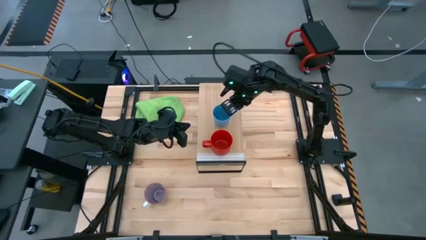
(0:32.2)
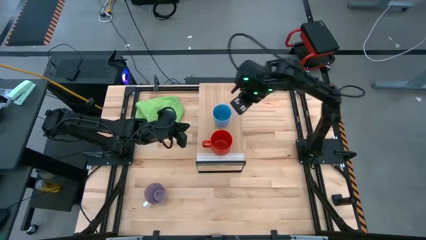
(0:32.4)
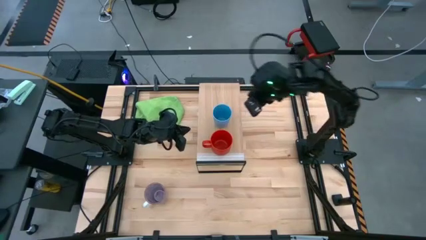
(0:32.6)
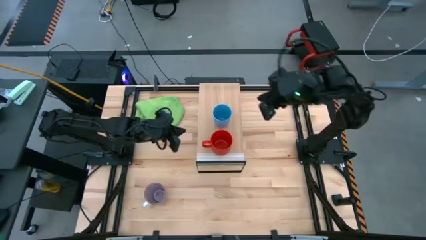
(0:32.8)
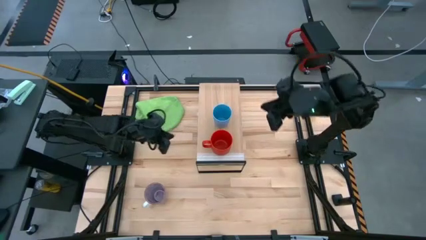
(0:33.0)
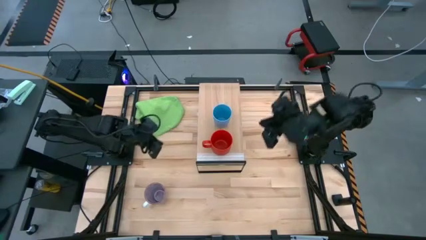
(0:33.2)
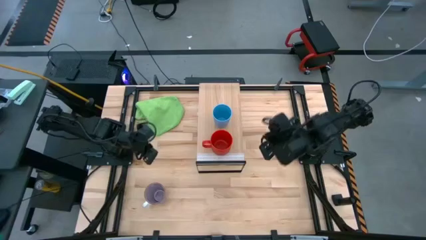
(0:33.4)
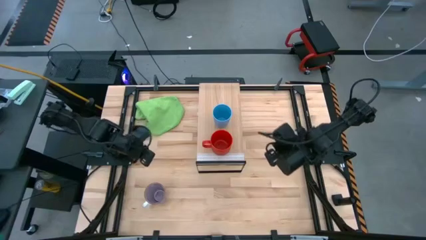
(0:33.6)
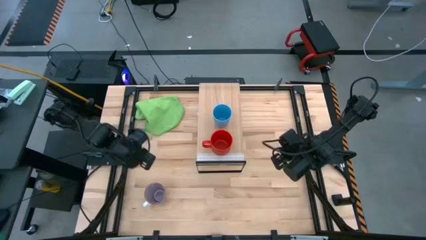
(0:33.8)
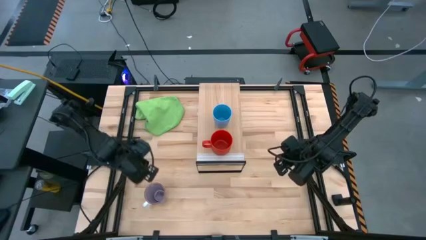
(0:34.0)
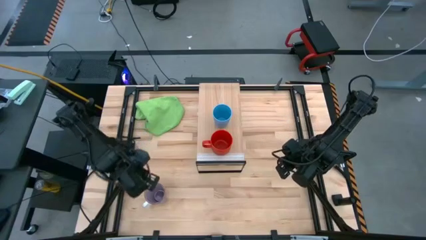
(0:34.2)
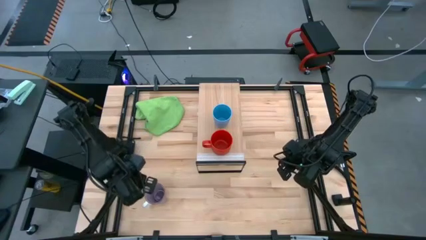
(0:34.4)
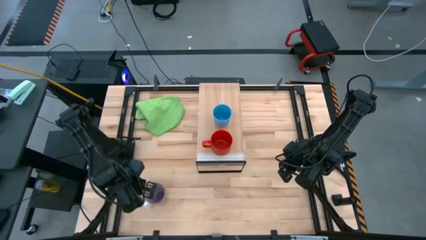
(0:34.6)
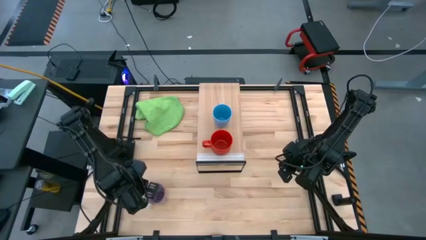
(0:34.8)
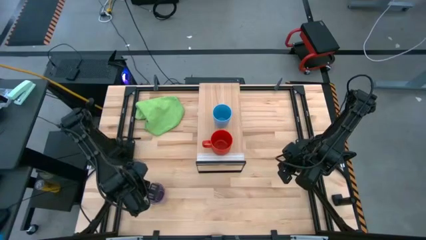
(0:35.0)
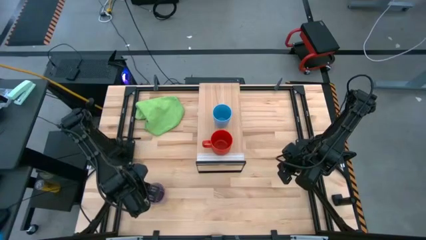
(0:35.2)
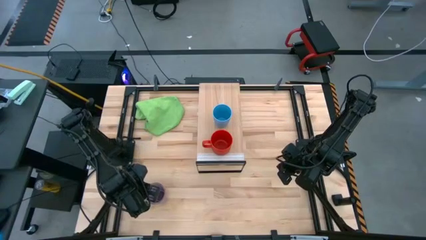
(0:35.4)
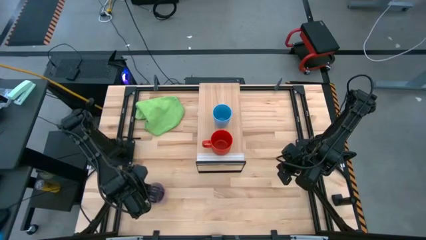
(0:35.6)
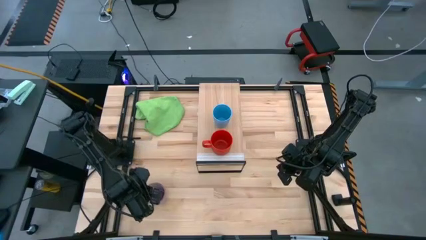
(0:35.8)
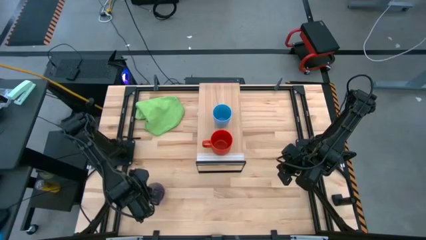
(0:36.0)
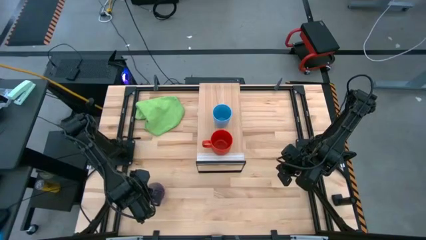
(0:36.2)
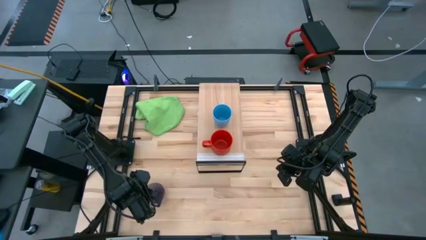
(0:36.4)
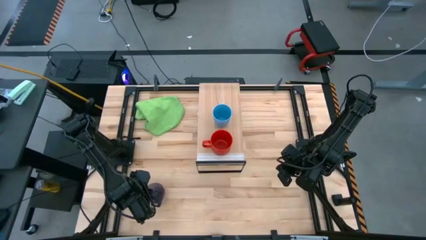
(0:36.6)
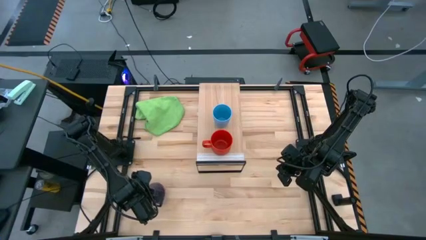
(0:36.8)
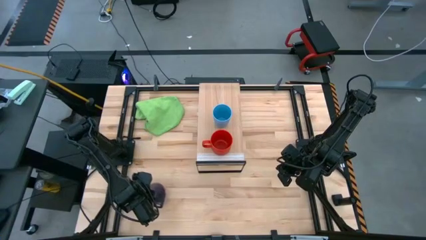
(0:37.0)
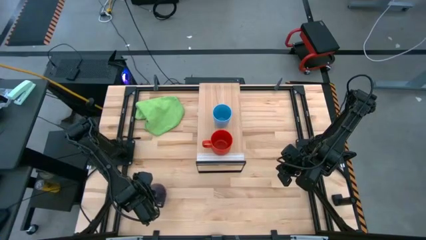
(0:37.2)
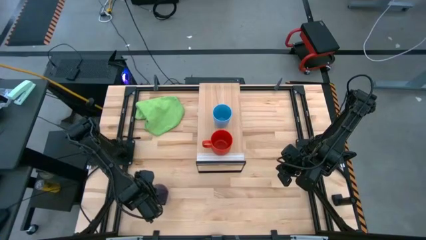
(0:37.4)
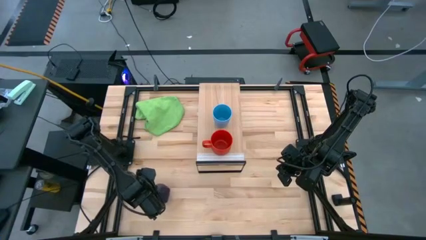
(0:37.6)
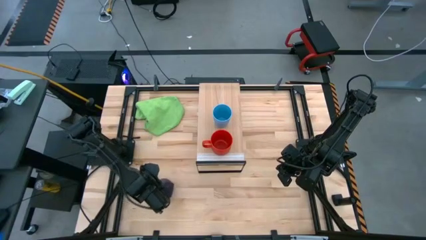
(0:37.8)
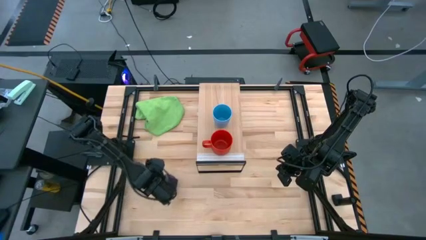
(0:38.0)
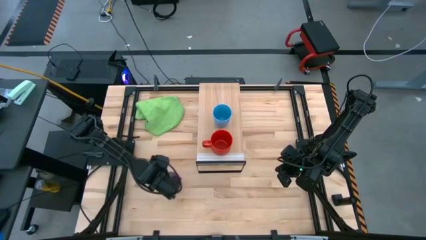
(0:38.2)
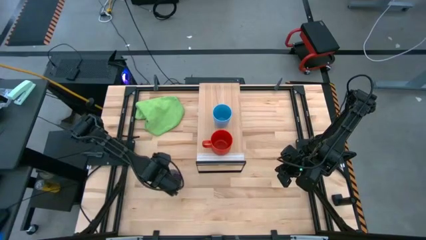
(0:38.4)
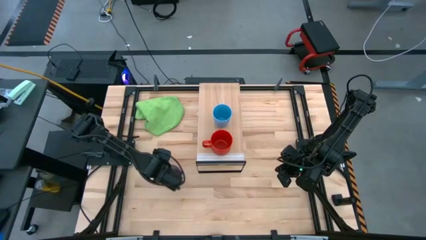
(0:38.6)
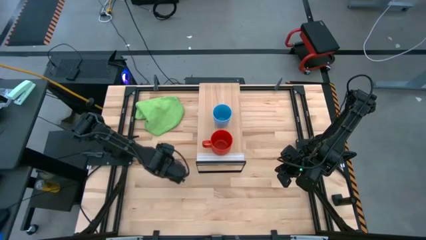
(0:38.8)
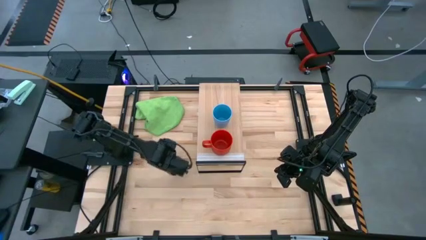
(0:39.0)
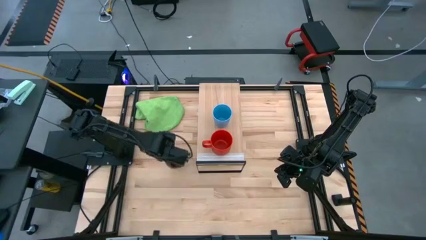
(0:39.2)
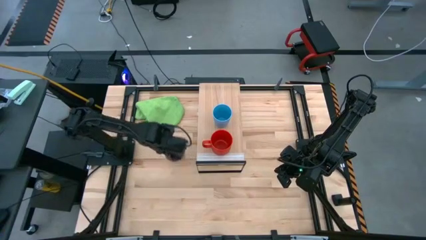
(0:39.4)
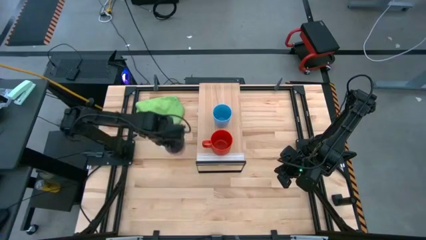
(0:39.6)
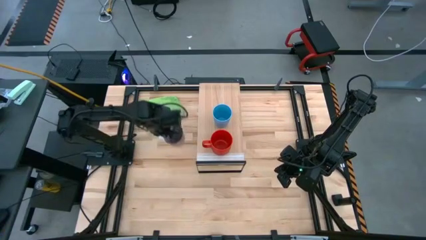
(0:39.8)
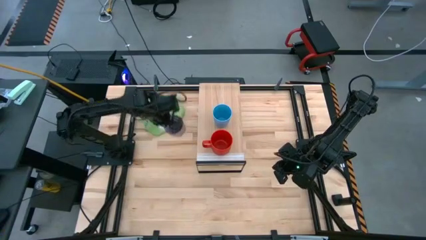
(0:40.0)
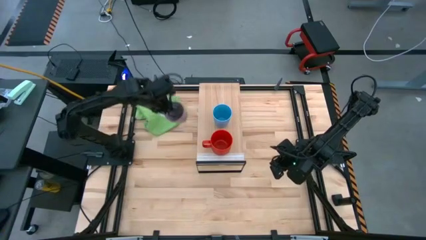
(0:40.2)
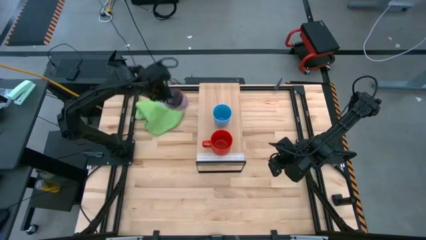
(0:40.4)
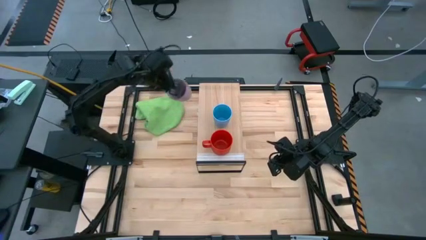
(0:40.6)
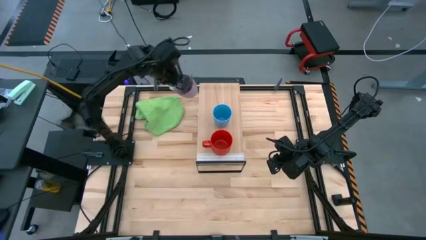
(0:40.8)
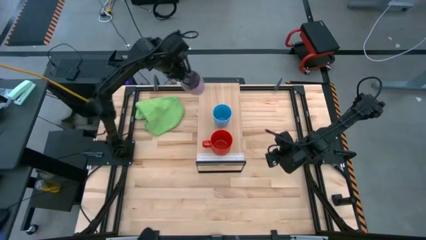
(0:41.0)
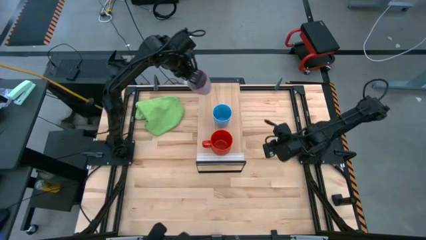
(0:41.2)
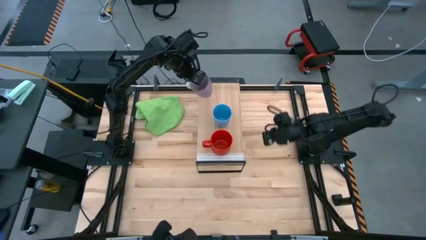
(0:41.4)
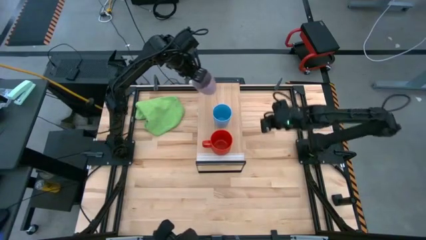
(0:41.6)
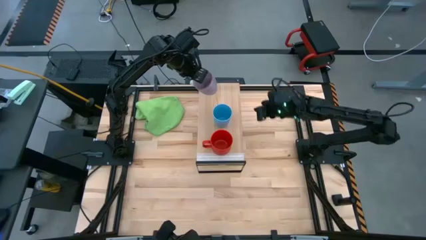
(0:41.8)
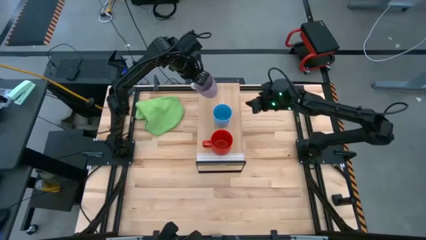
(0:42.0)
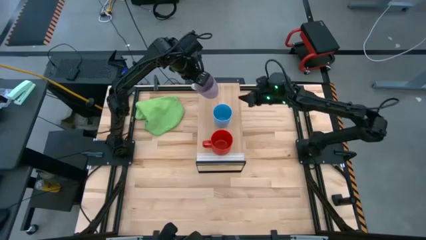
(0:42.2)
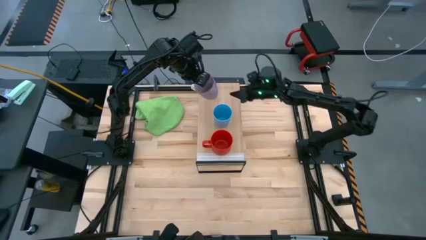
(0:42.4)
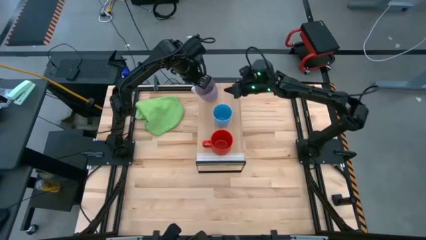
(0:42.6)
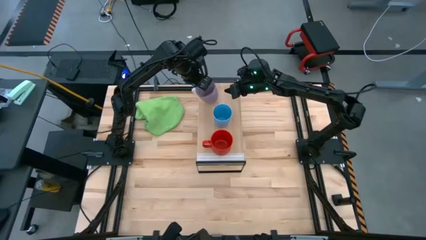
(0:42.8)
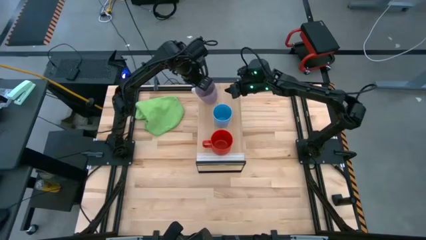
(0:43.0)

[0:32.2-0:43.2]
Task: Stack small to large cups/mugs on shelf
Put the purple mug on the shelf

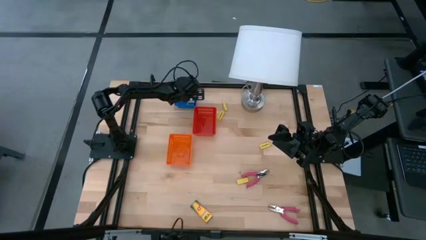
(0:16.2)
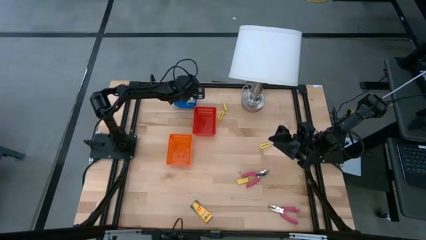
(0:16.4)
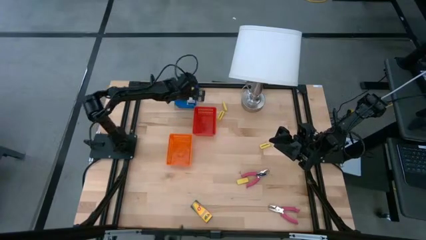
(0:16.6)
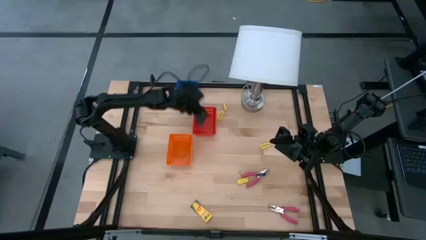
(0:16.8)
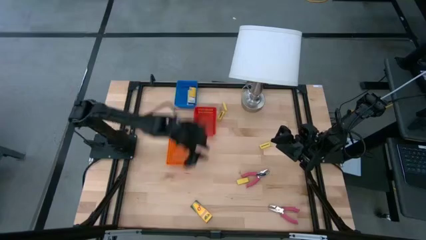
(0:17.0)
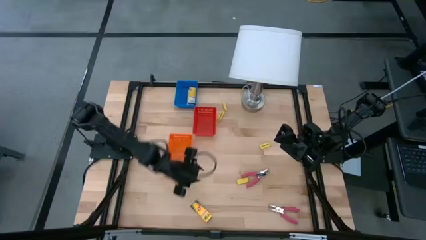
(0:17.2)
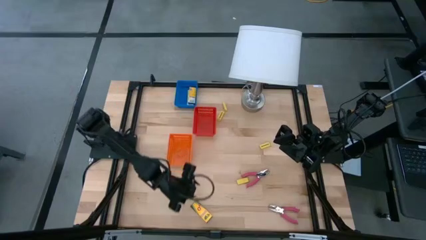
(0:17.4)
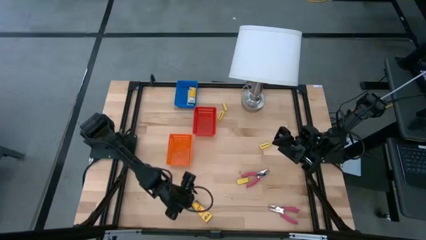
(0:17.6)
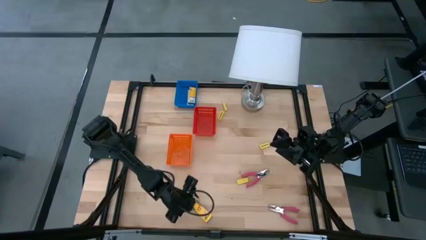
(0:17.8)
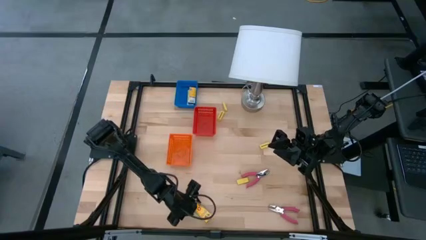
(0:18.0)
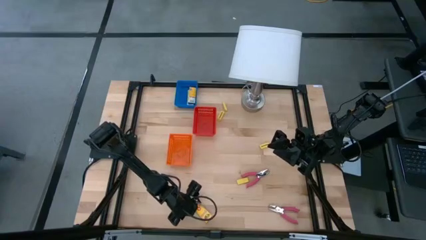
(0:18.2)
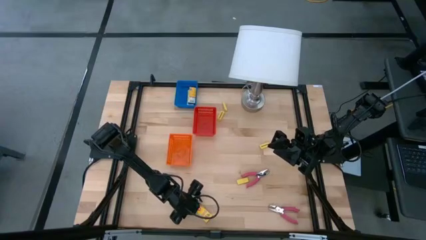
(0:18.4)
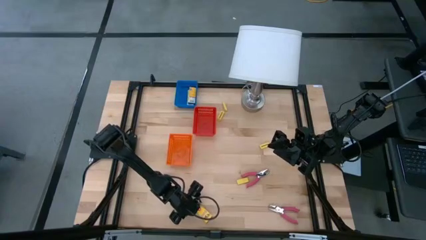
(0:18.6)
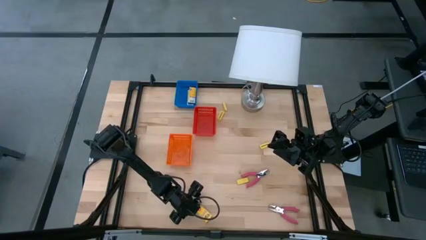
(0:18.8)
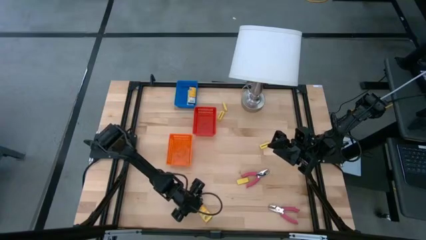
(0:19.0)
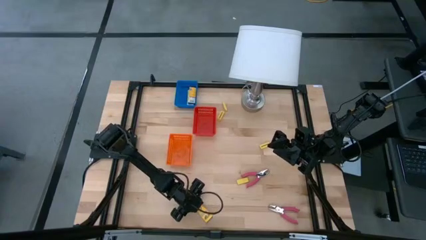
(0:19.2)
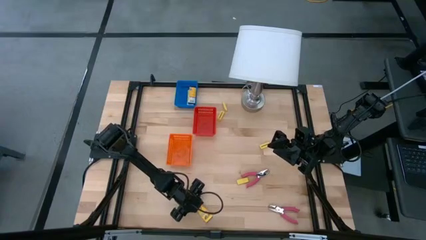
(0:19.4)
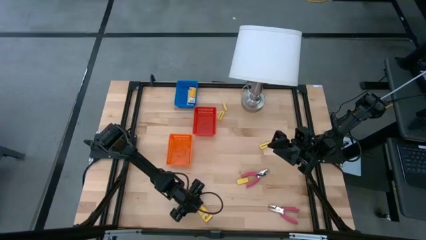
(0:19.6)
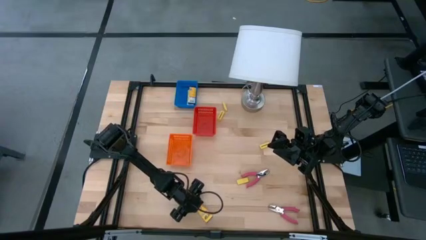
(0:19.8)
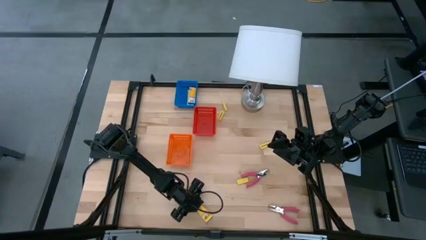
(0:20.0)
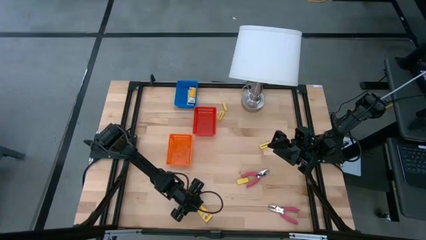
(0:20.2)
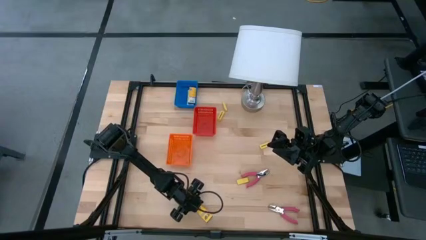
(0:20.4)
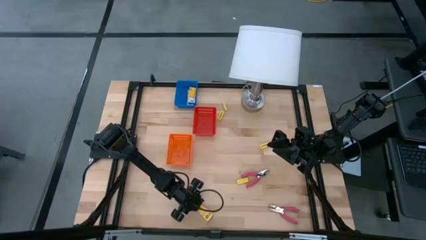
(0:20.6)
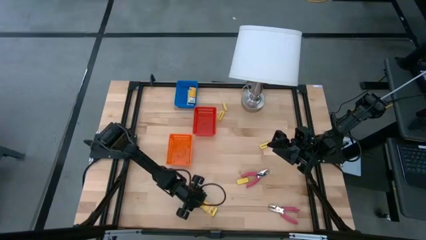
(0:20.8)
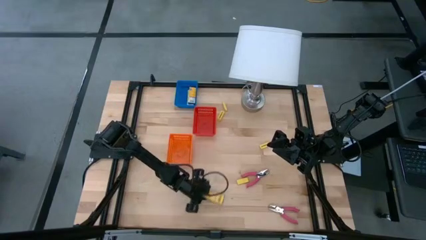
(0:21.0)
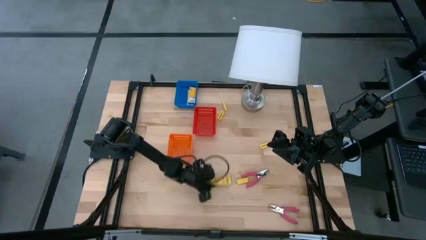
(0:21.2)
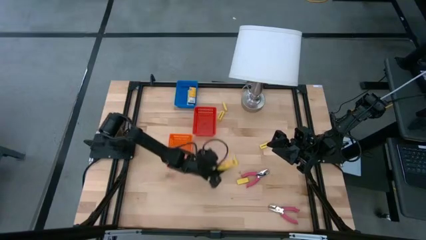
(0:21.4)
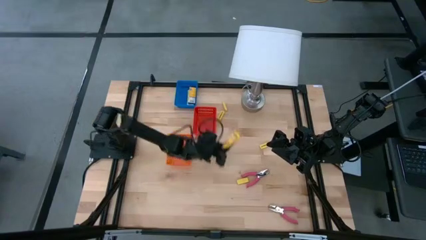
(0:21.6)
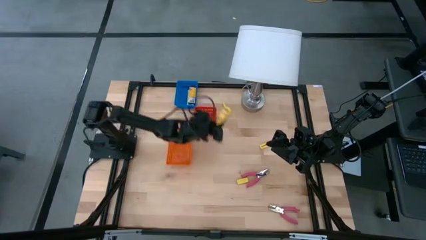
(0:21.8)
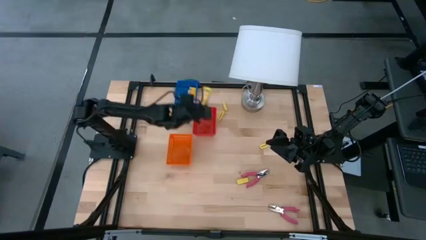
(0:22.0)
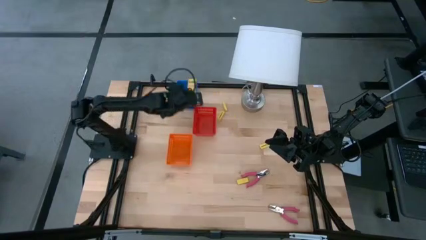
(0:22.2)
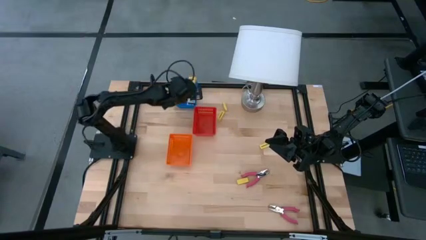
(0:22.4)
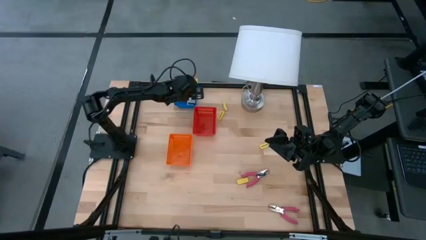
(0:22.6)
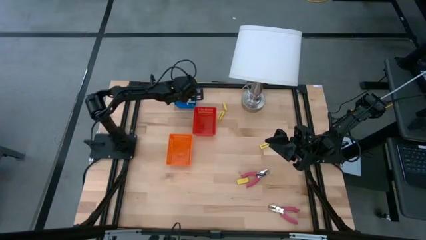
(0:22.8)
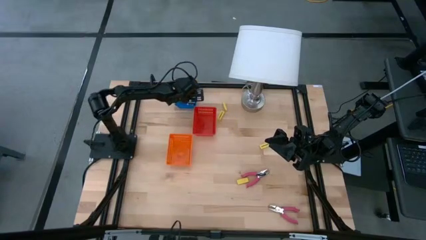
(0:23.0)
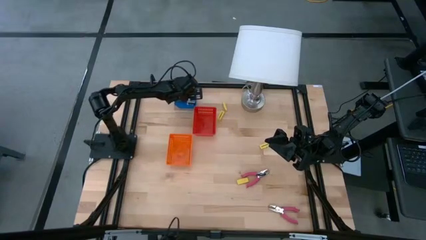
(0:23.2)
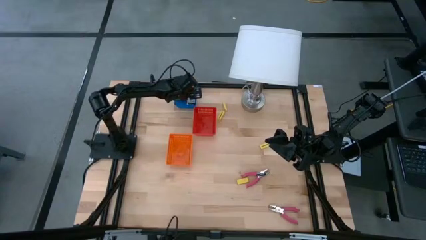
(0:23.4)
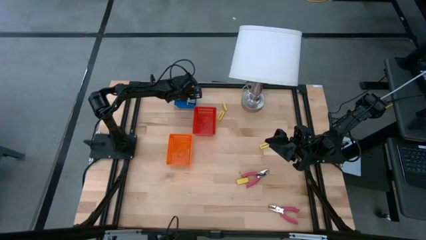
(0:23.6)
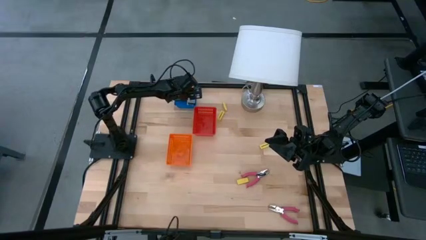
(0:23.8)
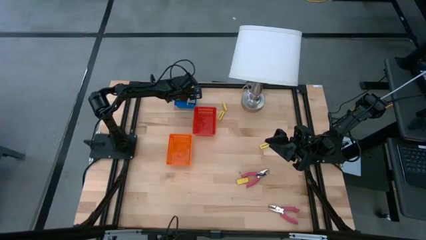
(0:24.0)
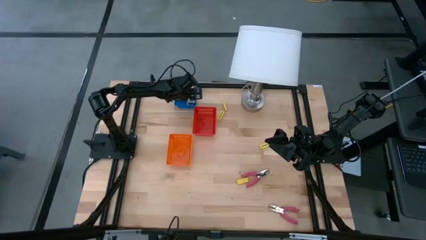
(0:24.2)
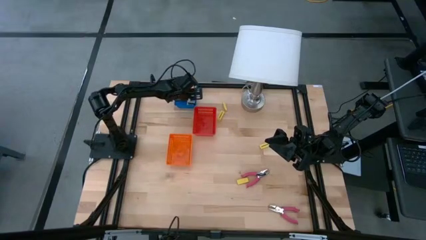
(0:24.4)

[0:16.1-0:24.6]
Task: Pick & Place School Supplies
Put the yellow crayon box into the blue bin
